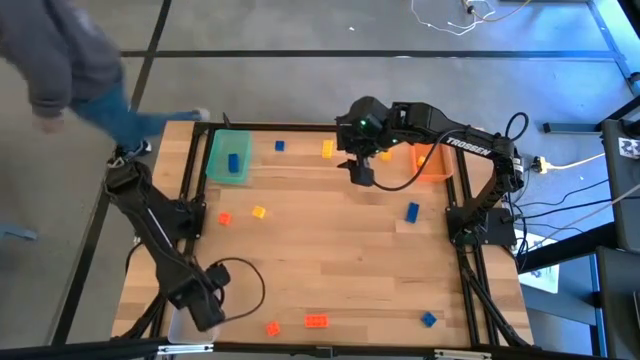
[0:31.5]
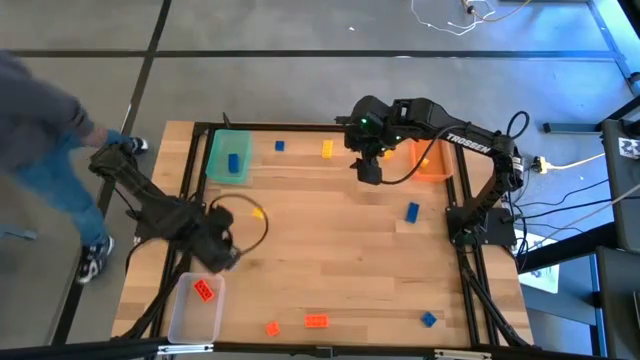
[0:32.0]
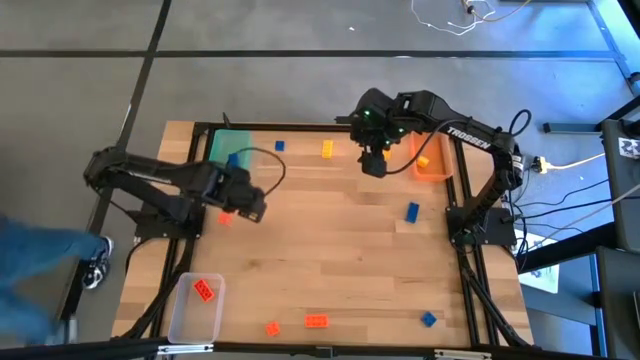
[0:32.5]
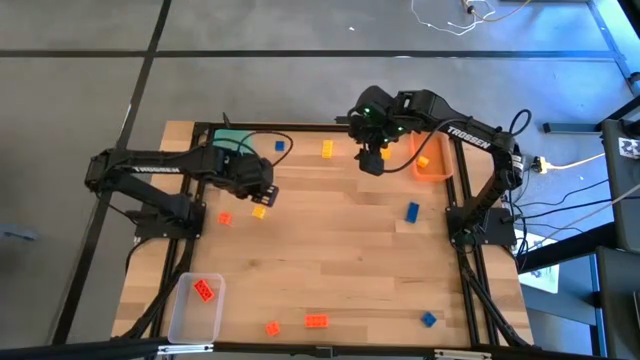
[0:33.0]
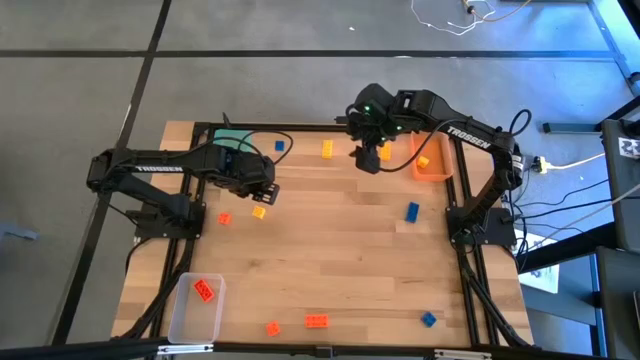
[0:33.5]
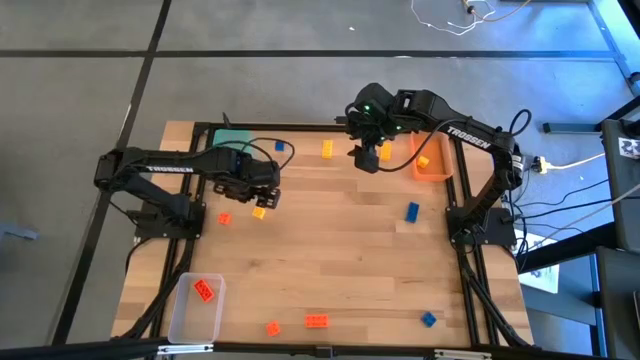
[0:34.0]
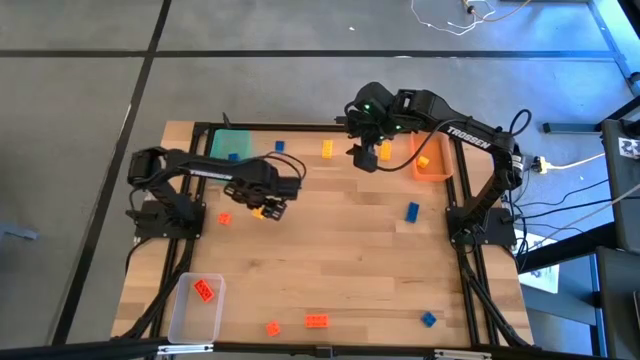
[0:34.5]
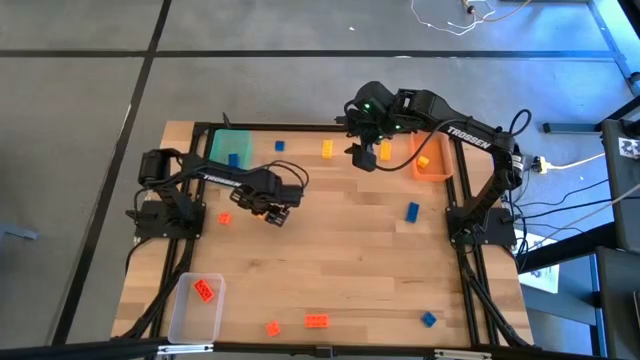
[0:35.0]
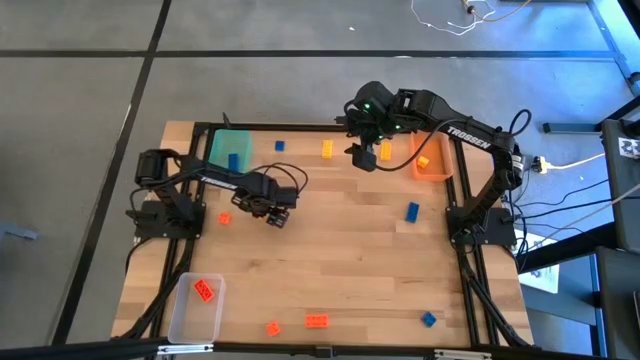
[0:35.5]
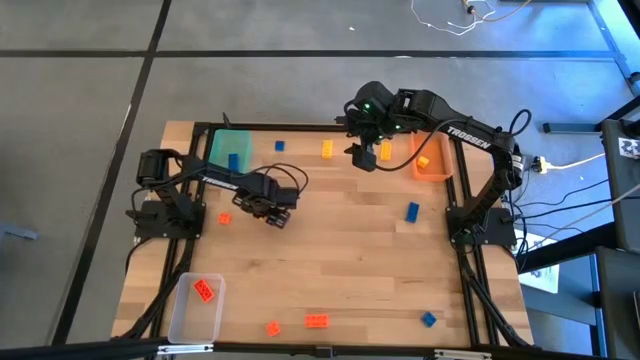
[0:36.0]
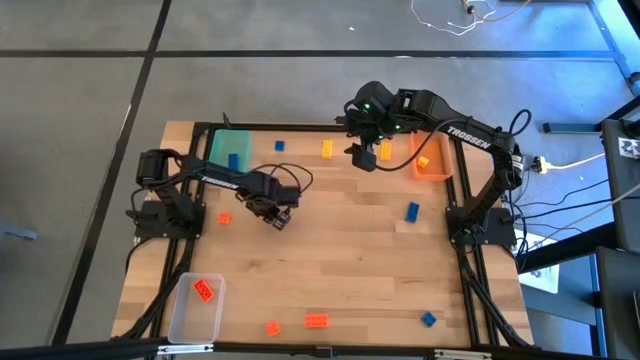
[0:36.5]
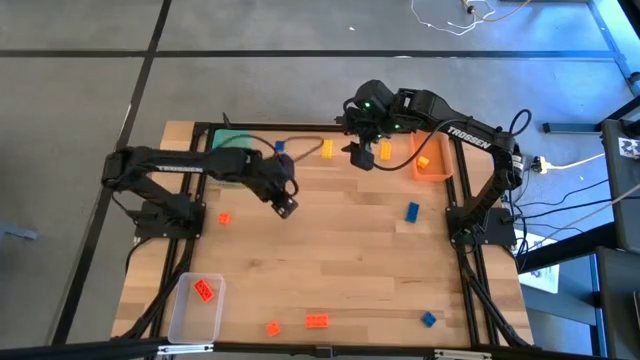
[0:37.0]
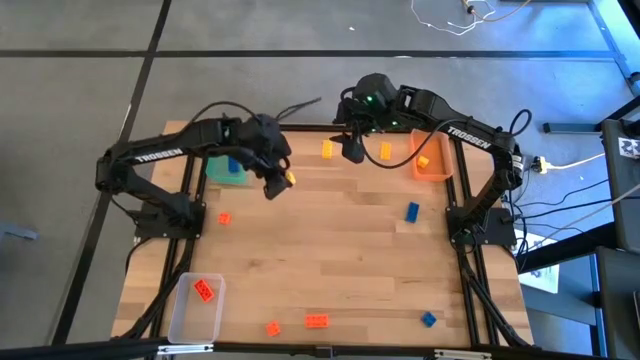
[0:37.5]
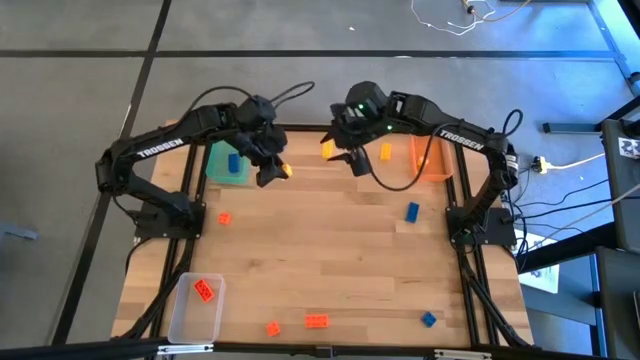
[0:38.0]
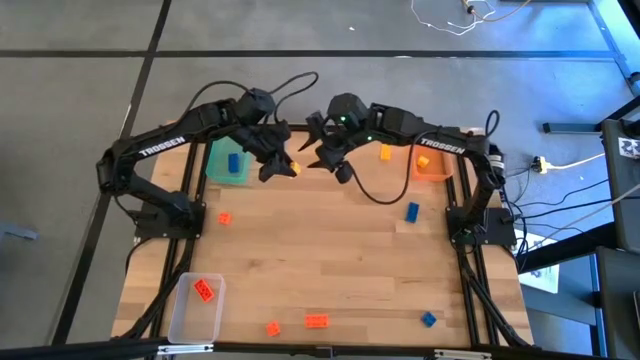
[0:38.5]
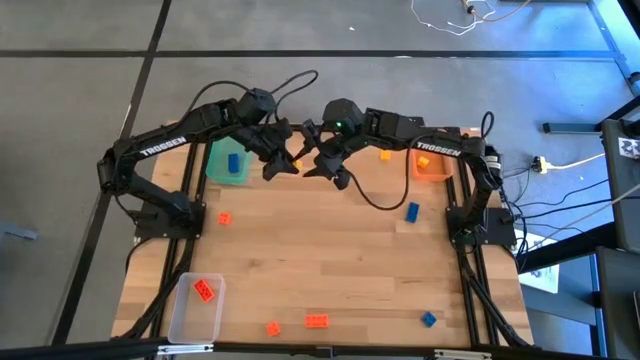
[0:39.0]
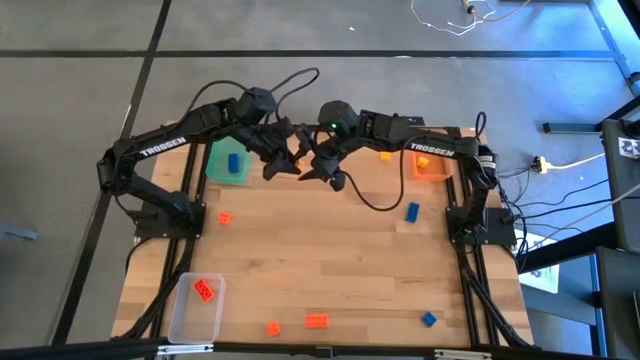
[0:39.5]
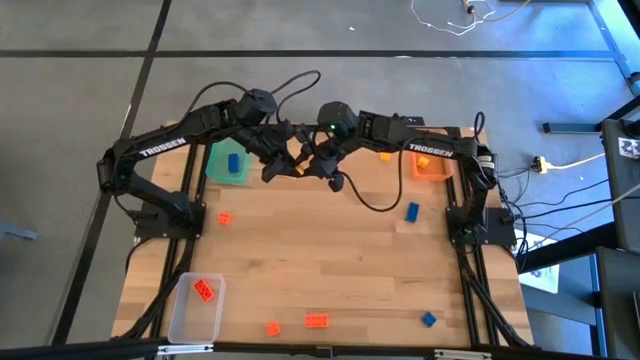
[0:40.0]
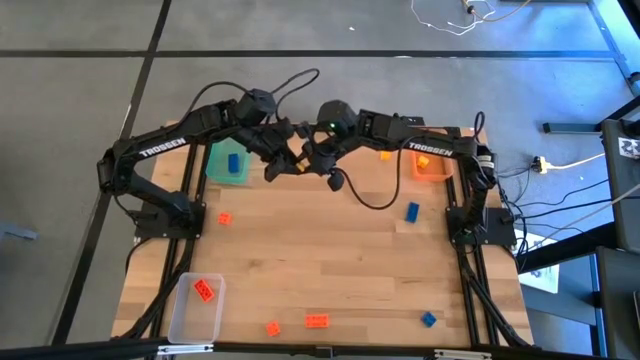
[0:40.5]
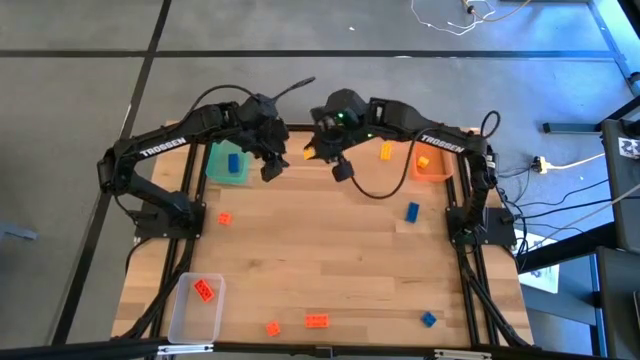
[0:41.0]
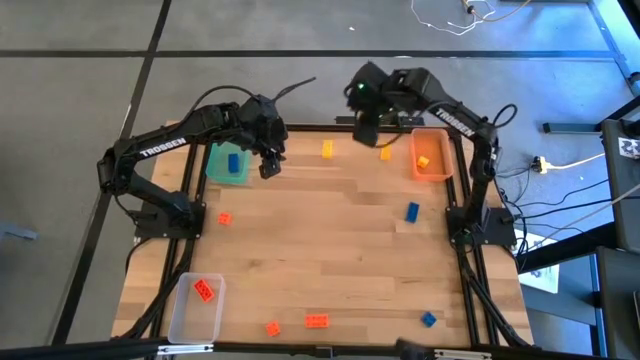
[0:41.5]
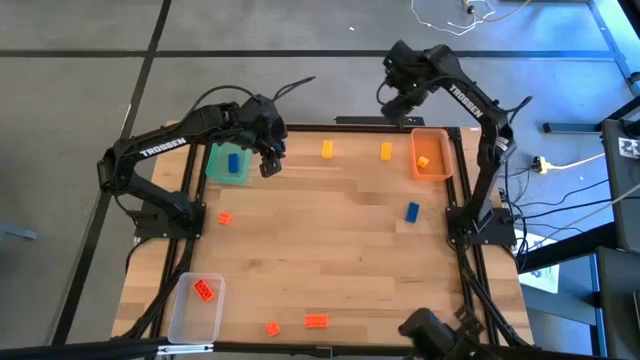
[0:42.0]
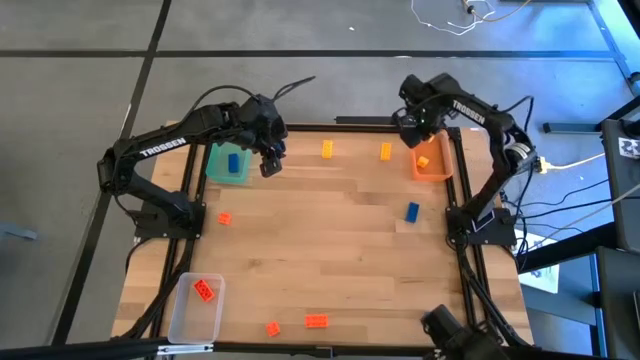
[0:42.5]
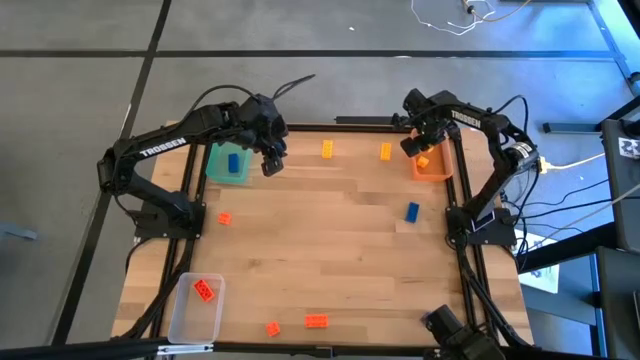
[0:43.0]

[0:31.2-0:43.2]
Task: Sort & place blocks by color
Put the yellow game piece into the orange bin

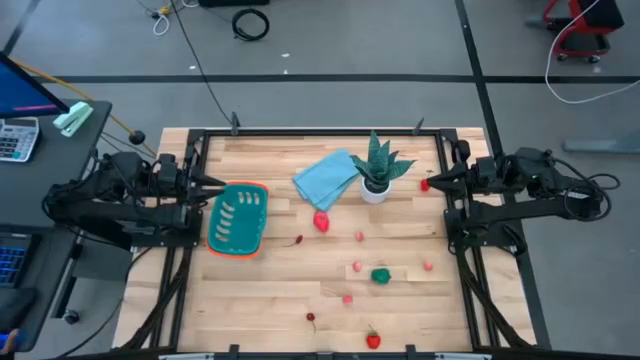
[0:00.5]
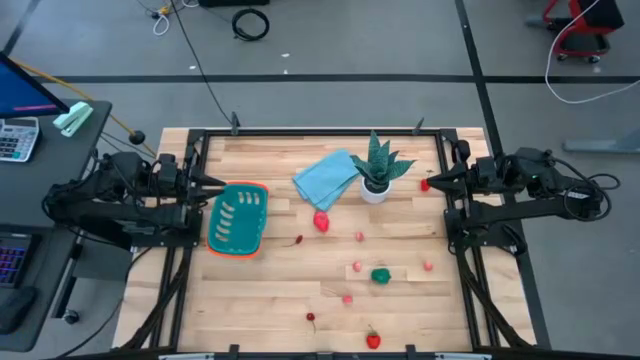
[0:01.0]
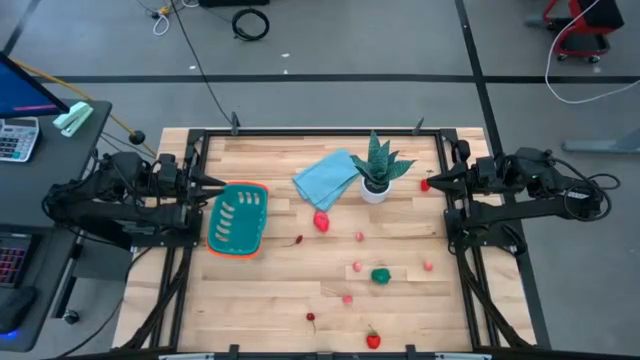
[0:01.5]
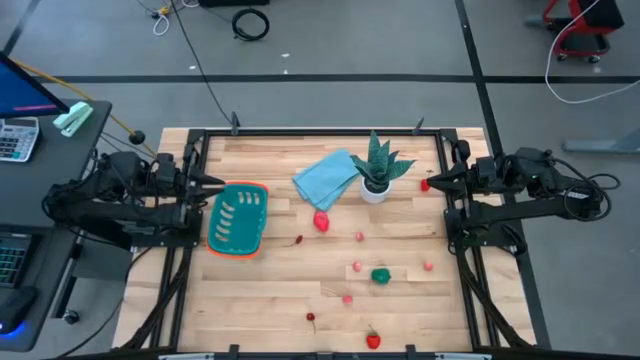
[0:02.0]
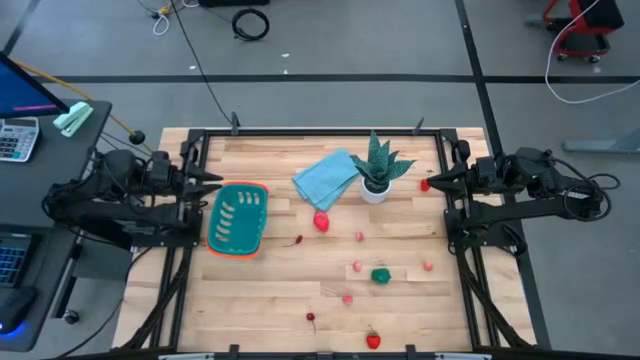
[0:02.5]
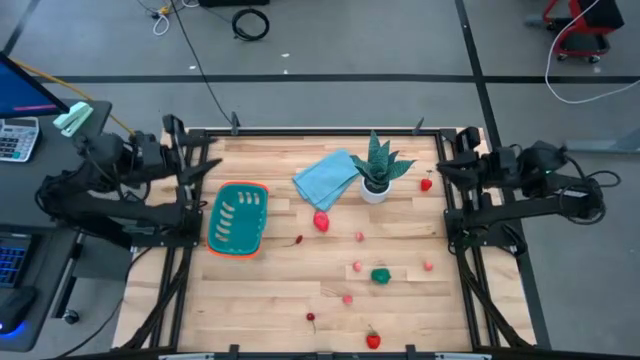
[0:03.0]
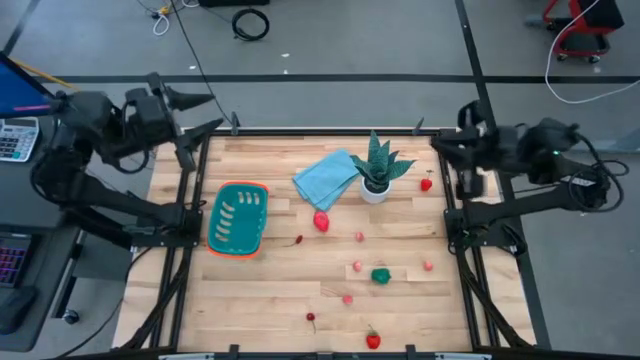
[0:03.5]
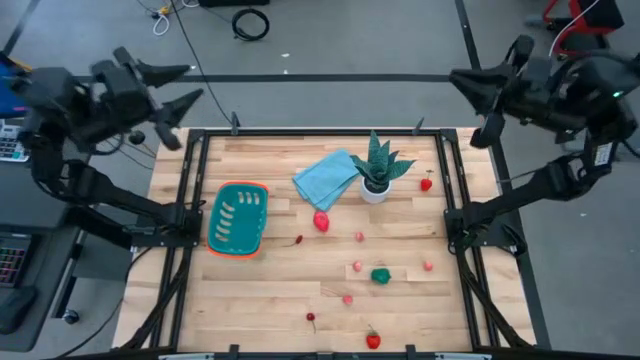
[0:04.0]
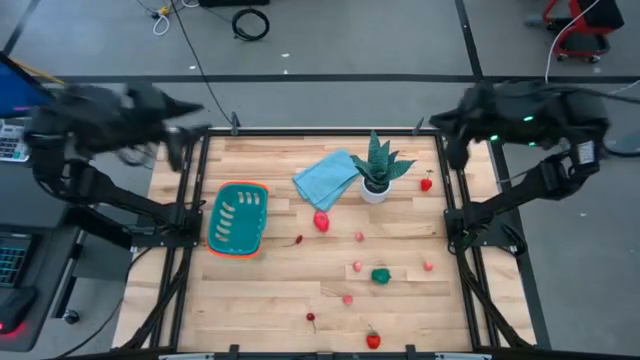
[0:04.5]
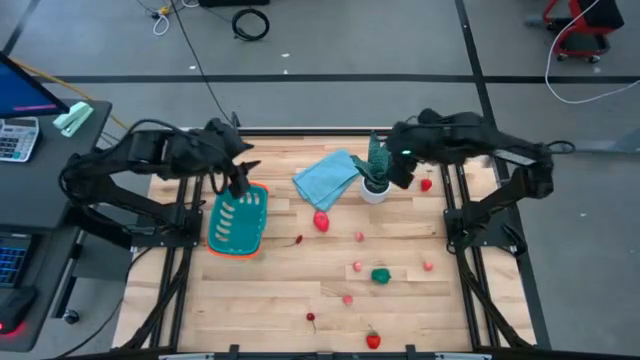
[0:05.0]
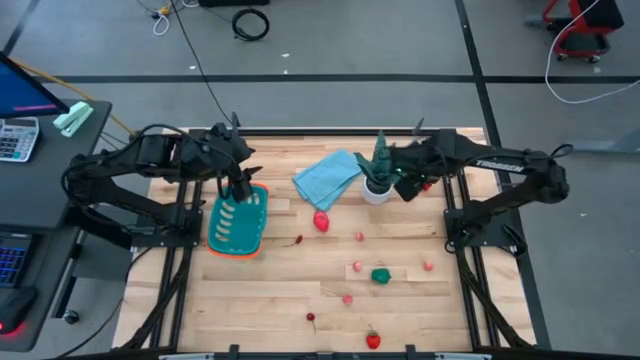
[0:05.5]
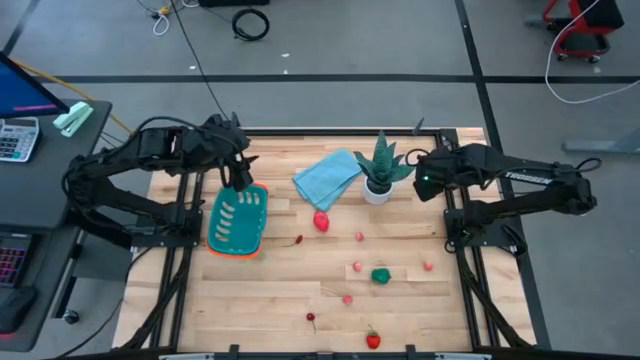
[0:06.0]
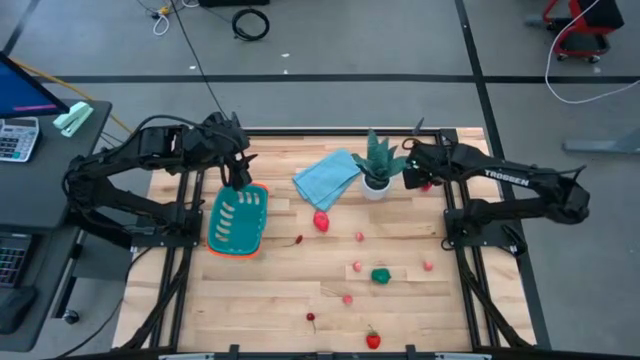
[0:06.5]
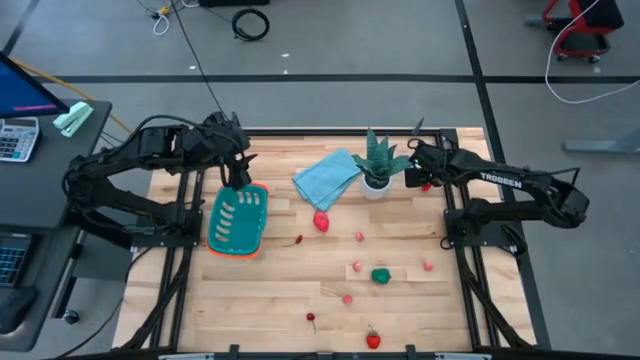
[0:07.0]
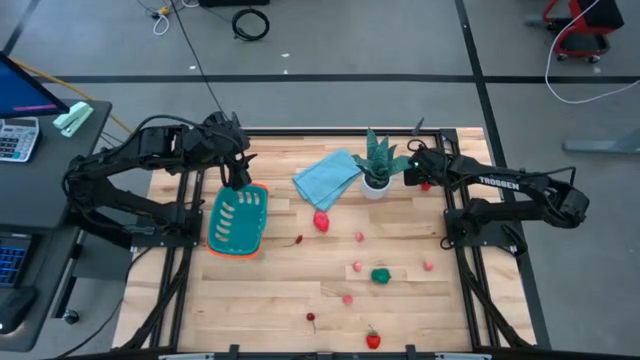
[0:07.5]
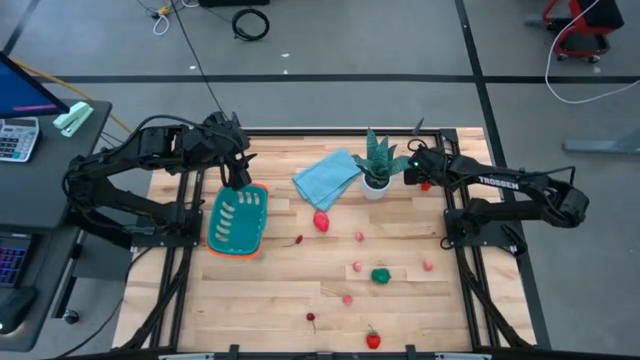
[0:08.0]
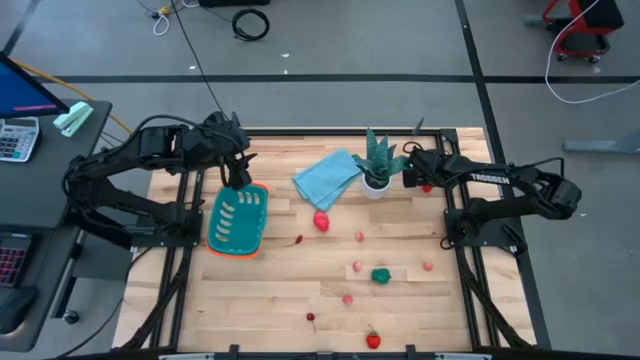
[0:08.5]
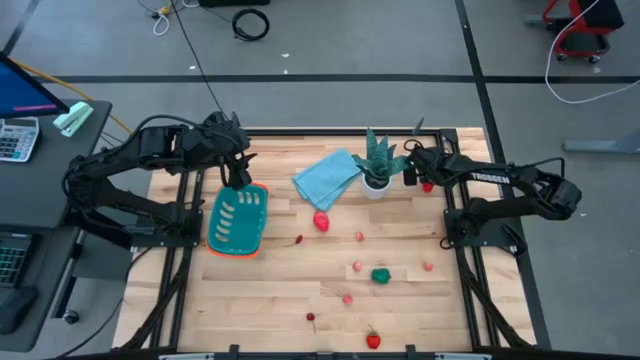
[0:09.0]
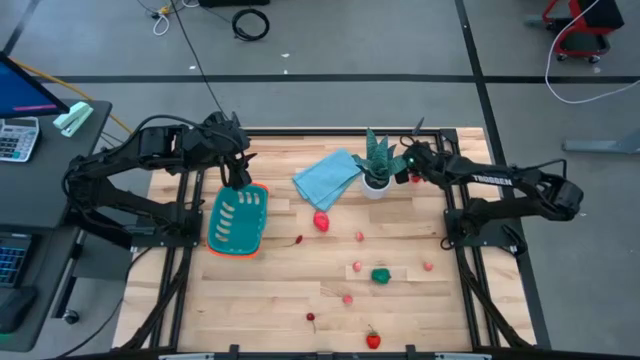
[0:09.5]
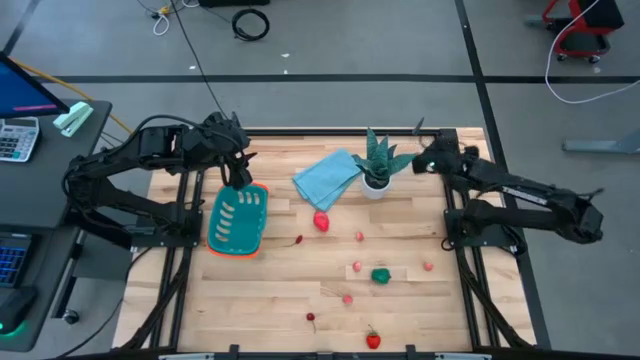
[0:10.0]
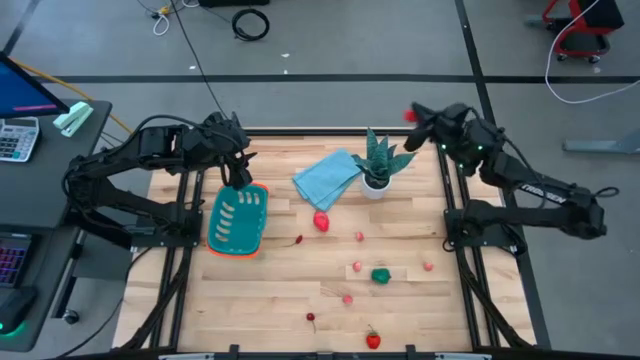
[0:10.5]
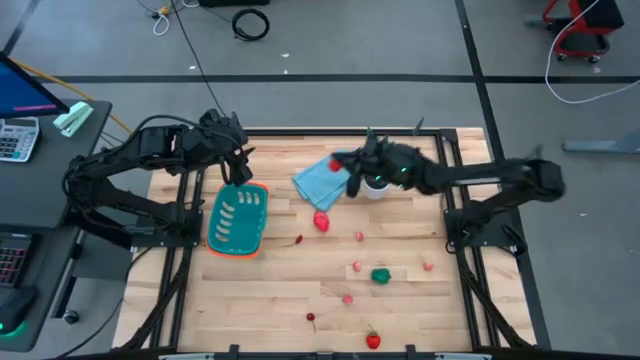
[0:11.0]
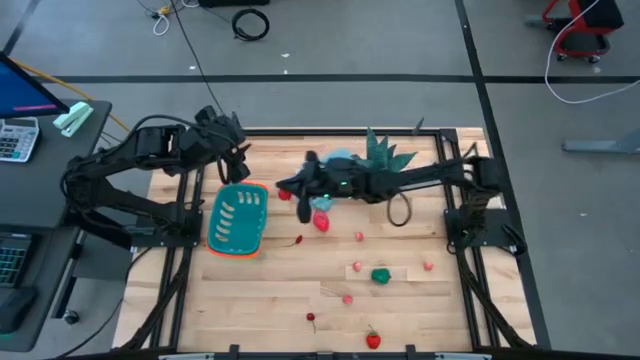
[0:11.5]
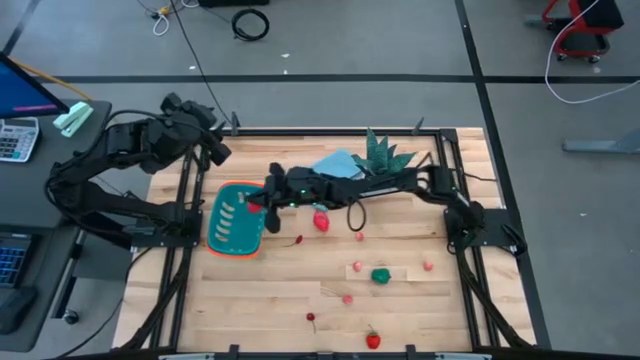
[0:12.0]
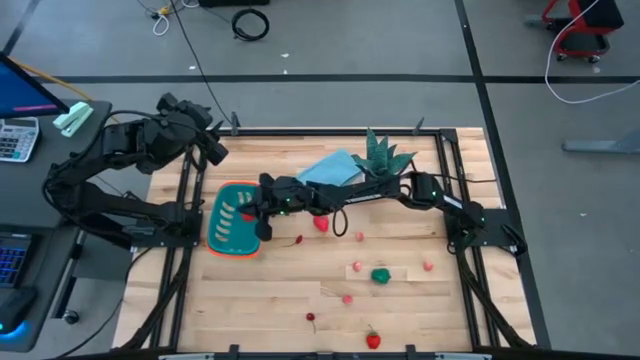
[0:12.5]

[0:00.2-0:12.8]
Task: Pick and placing Produce into tupperware
Put the top red strawberry into the blue basket
